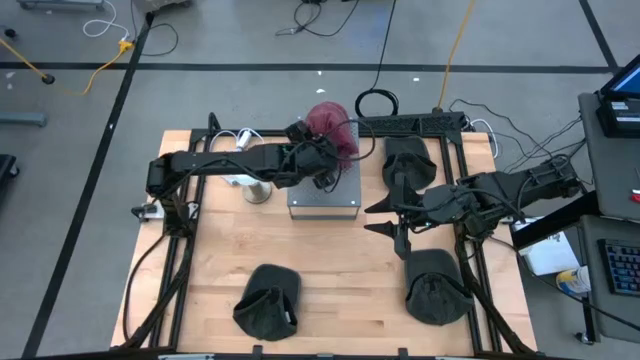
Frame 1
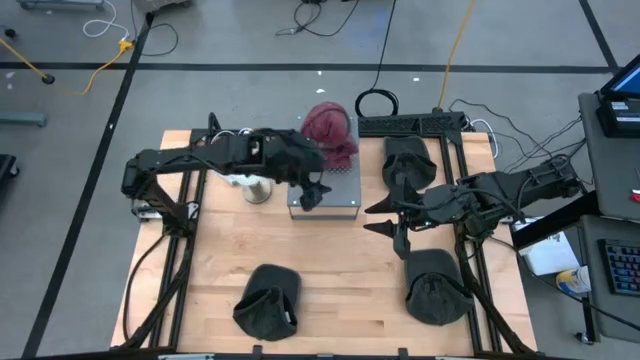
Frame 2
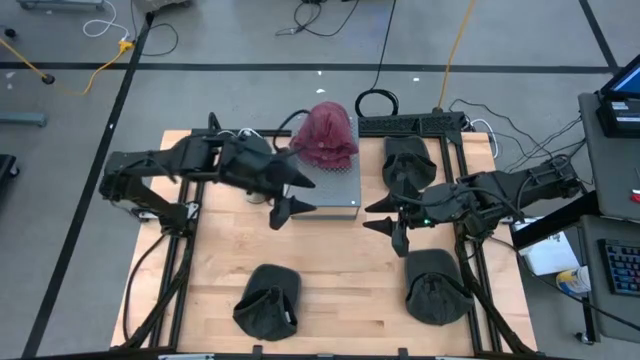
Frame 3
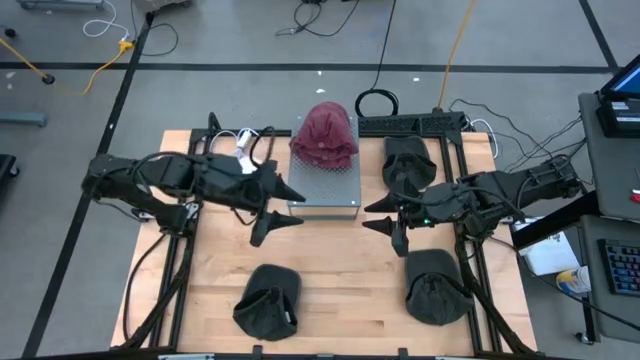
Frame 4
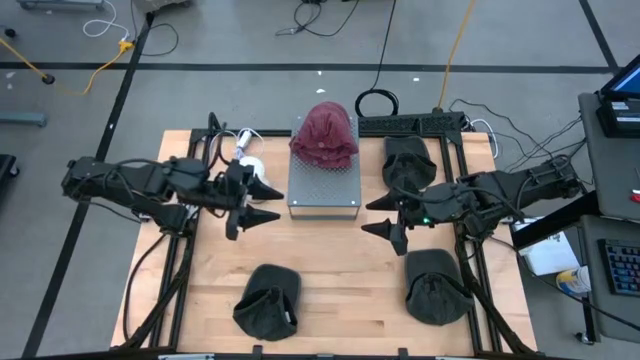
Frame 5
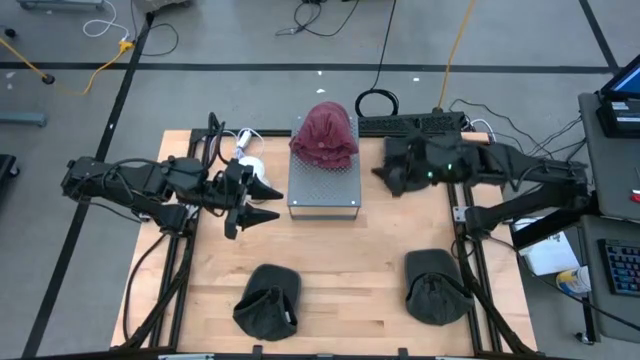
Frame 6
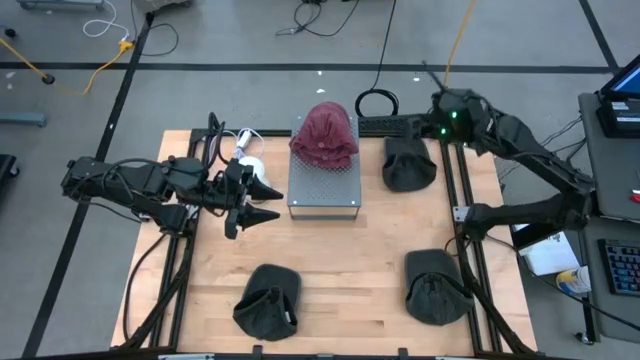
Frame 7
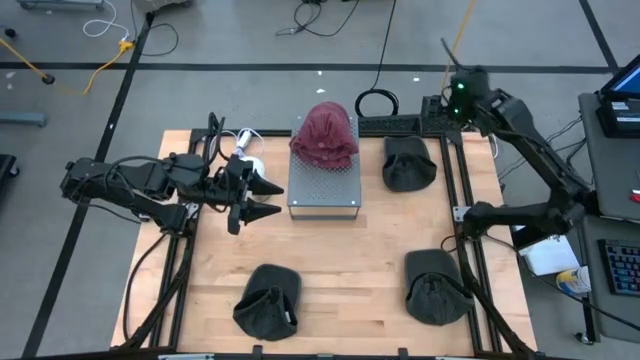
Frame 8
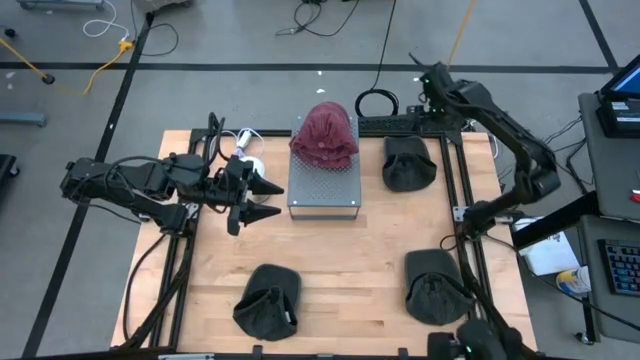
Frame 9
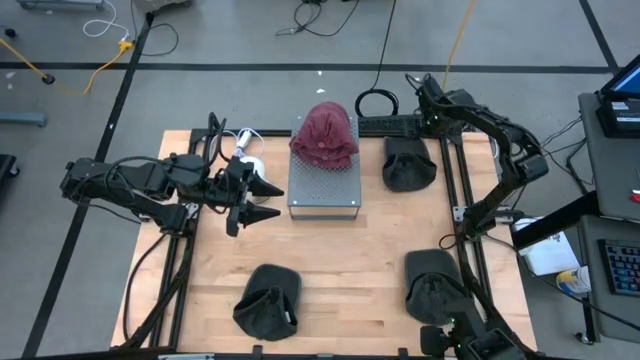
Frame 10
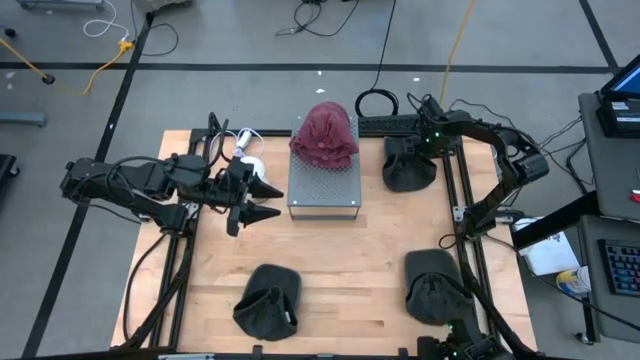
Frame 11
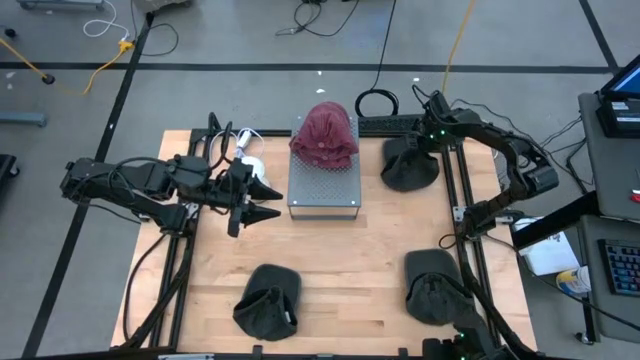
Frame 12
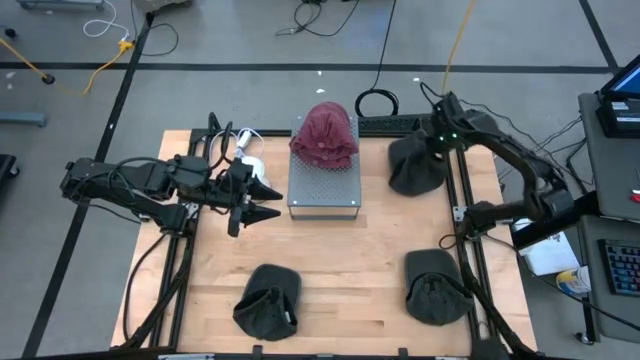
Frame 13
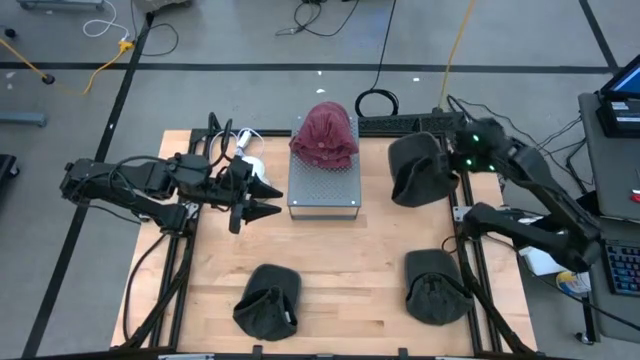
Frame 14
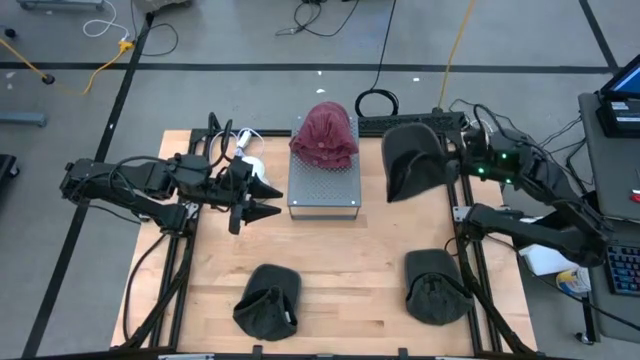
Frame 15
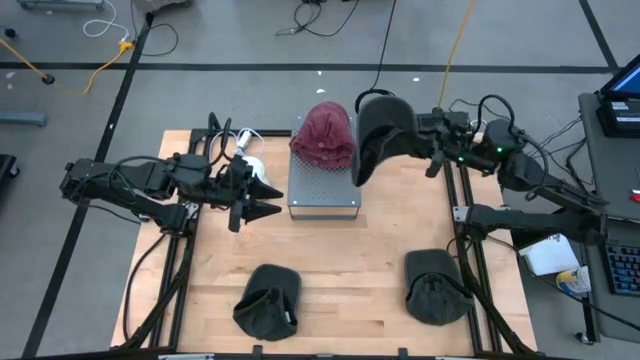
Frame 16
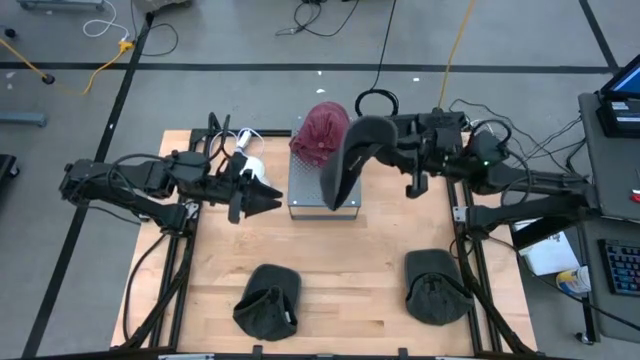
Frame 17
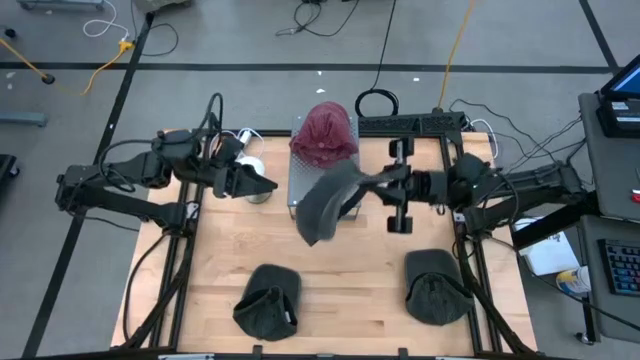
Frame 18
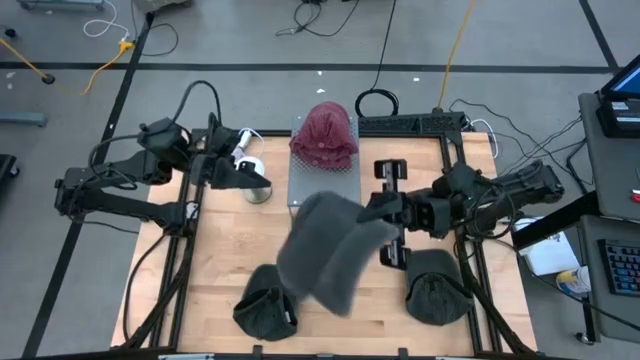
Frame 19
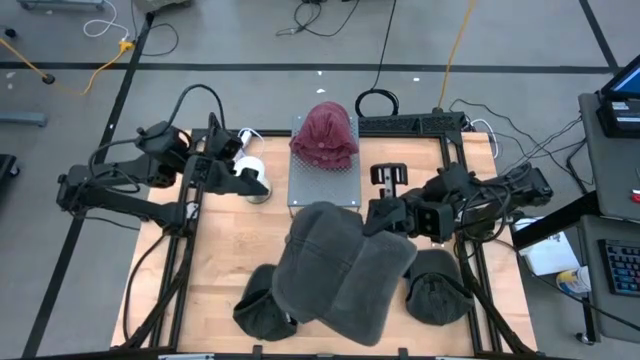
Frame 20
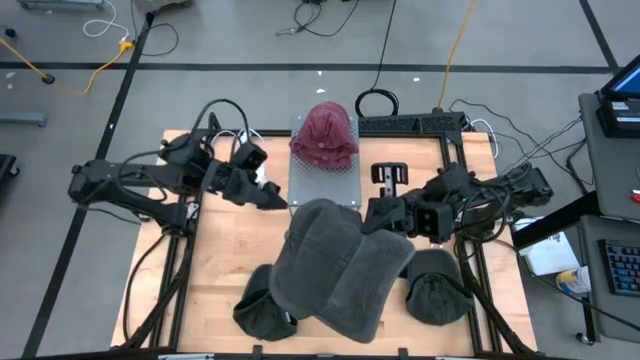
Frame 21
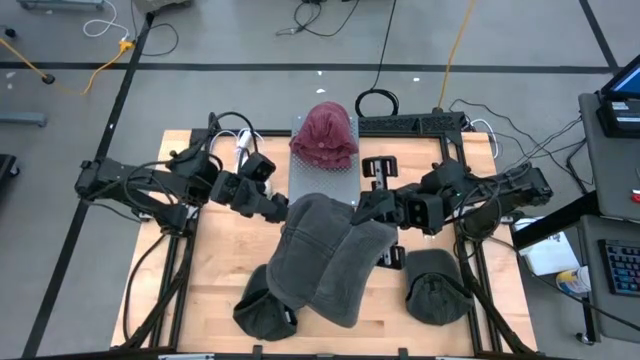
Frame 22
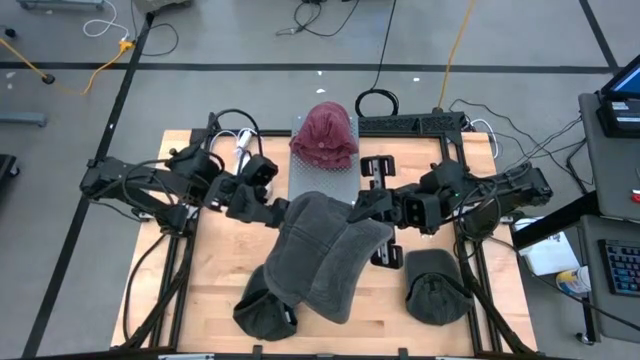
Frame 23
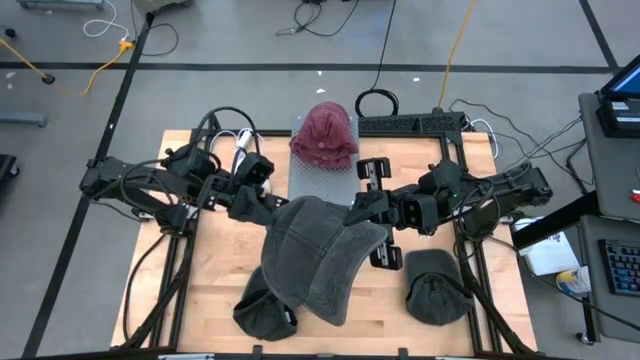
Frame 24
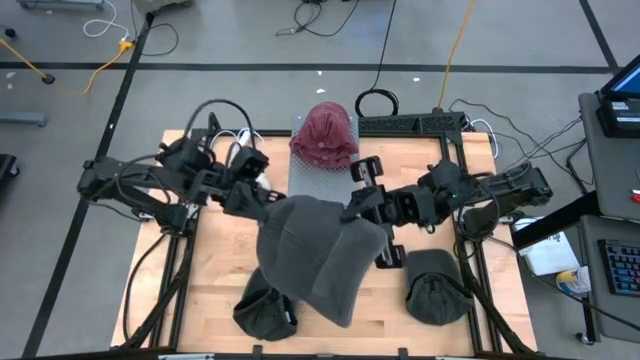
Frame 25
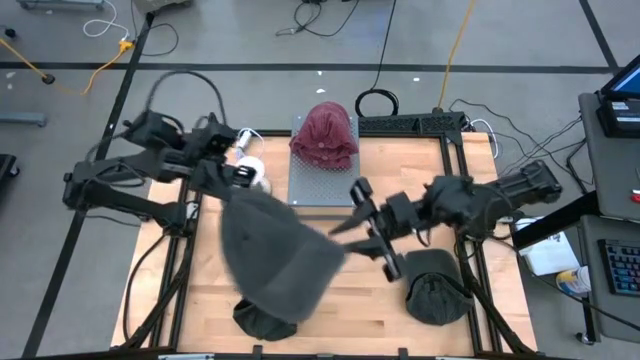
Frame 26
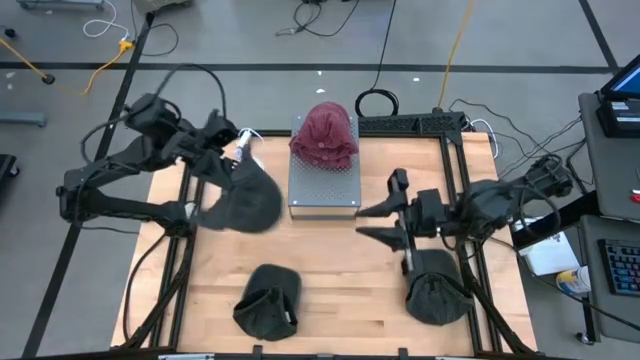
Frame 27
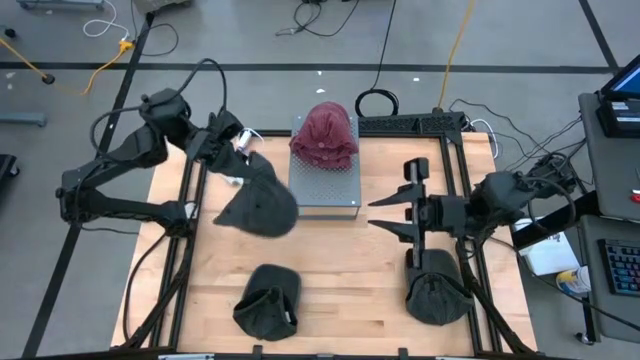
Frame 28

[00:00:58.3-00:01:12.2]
Task: Pick & Place hat
Put the top right black cap on the shelf

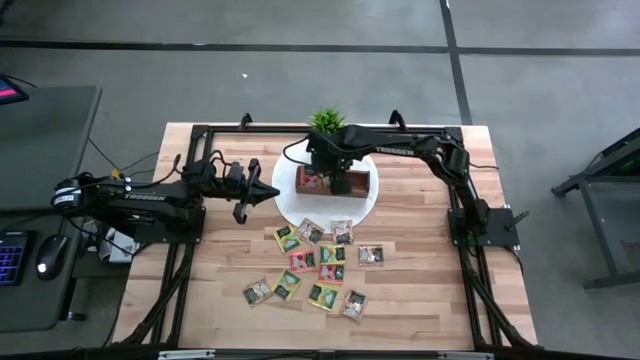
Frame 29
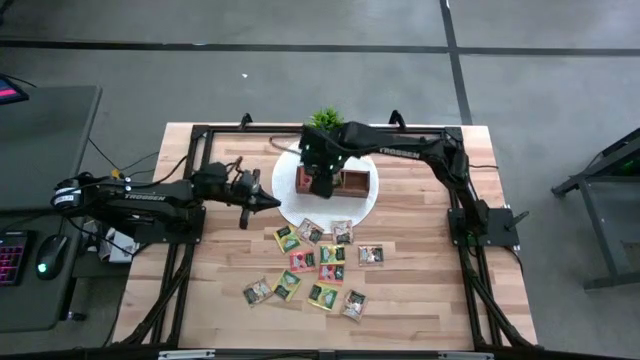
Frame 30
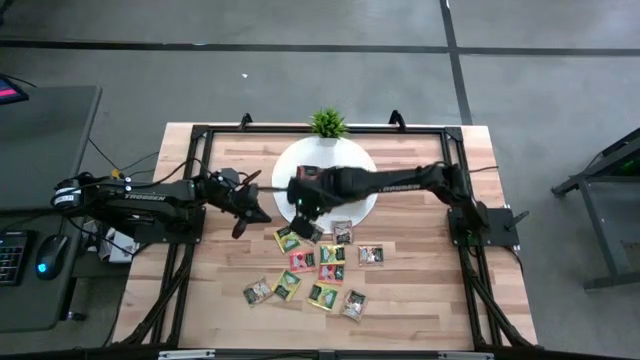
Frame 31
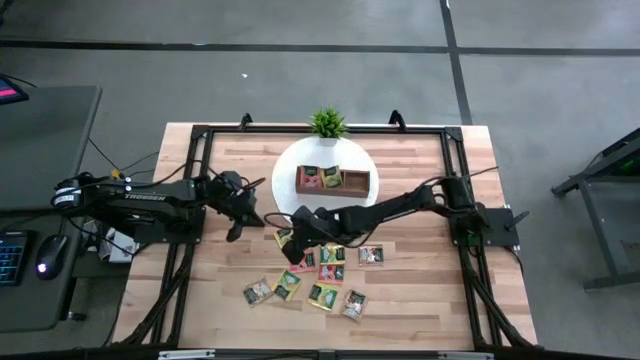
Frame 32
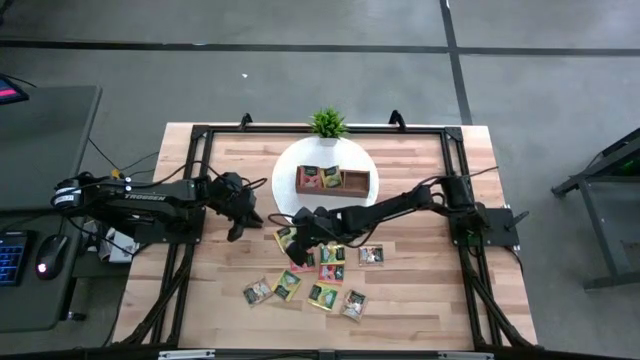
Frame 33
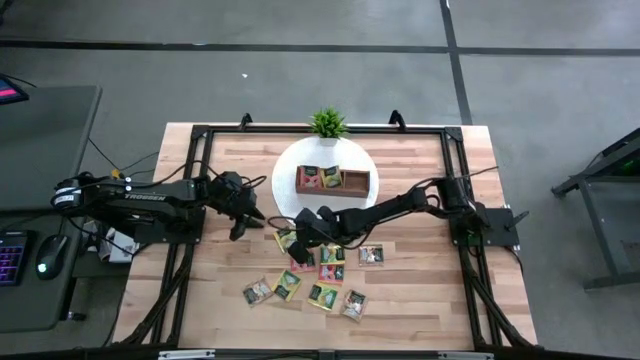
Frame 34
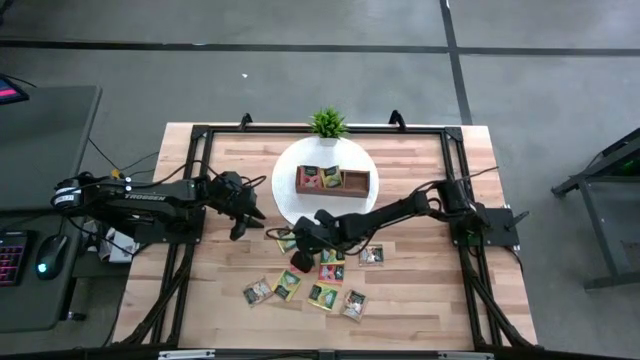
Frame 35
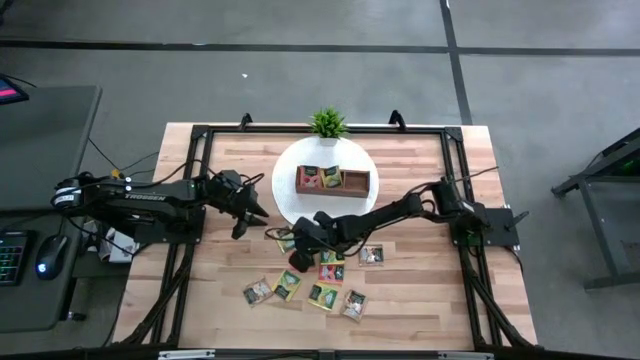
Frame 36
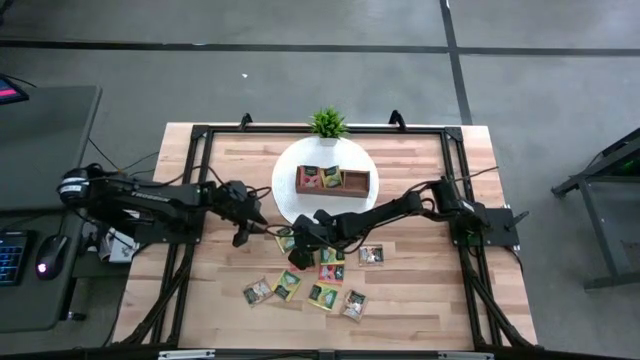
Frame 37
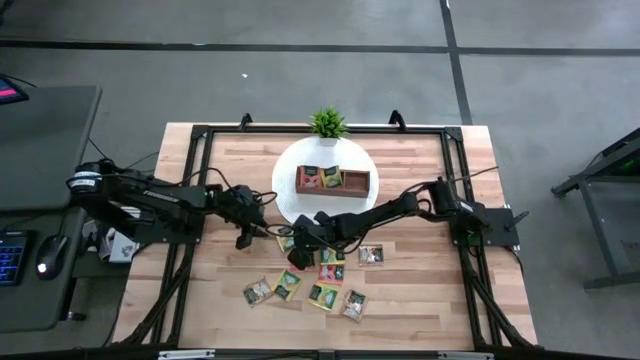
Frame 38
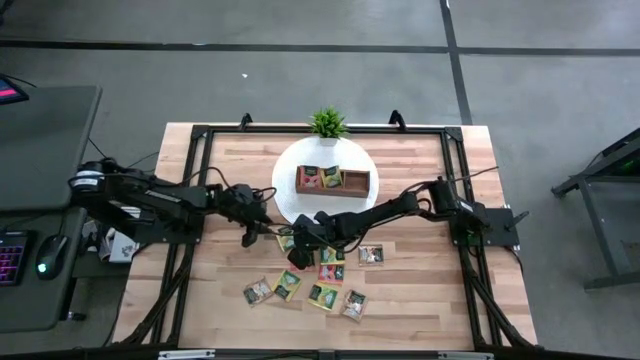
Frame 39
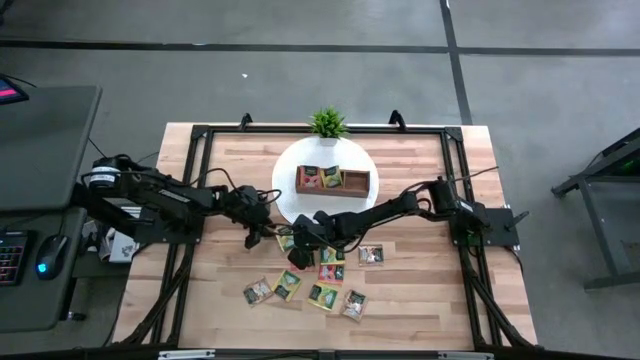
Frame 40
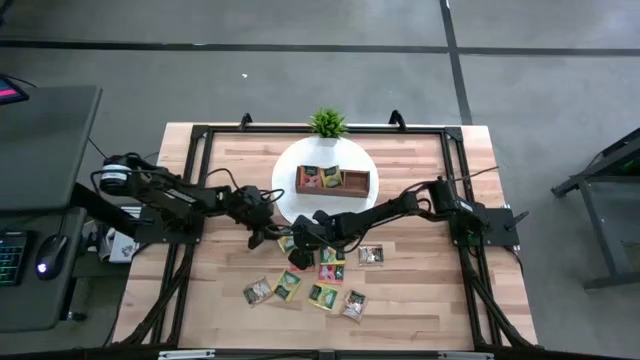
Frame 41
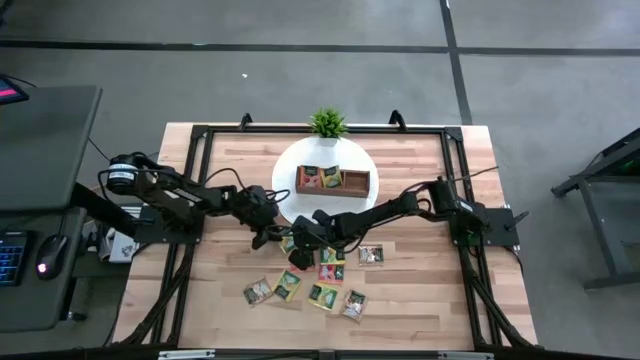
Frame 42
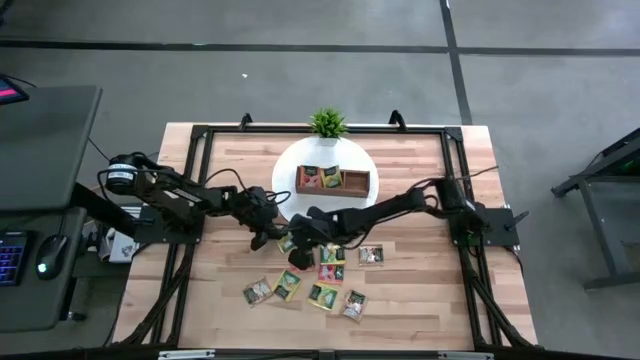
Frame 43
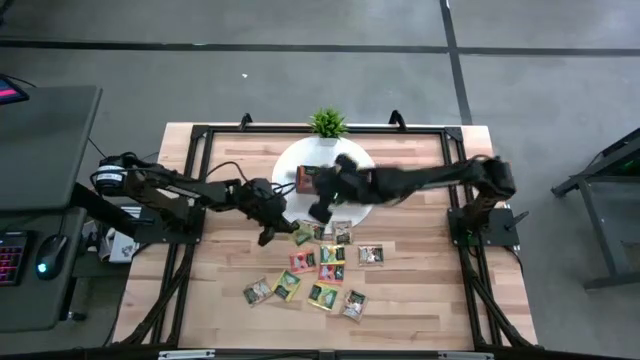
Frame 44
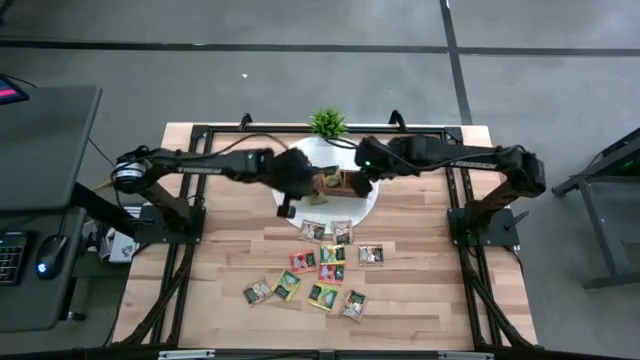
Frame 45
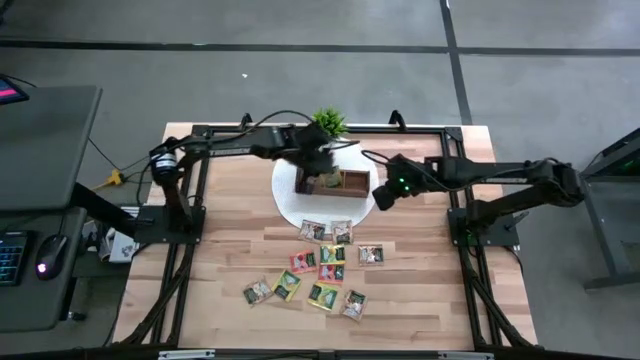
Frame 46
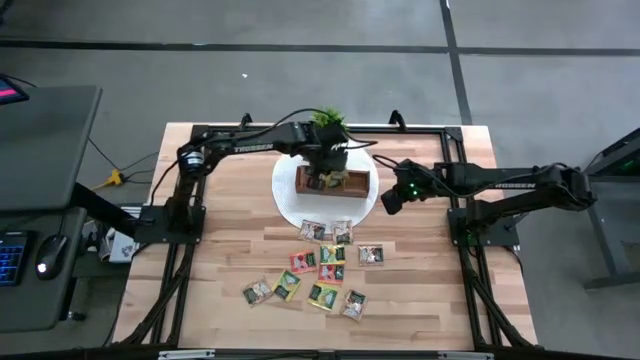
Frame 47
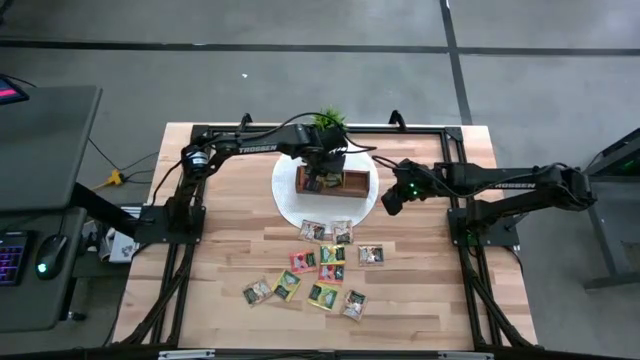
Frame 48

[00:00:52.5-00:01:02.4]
Task: Pick & Place Tea
Put the yellow tea bag into the middle section of the wooden organizer
